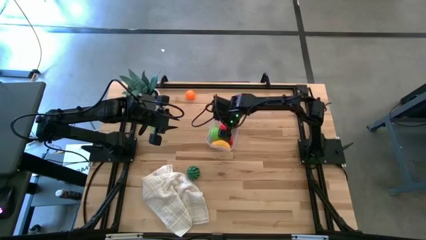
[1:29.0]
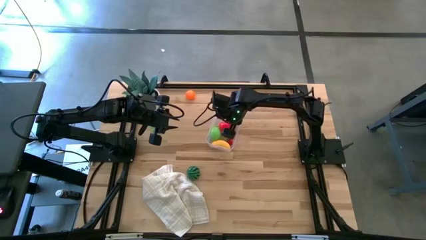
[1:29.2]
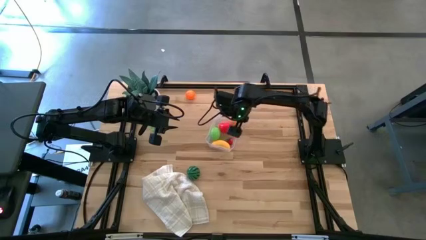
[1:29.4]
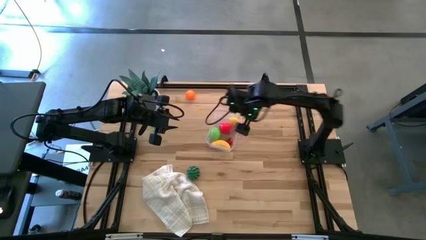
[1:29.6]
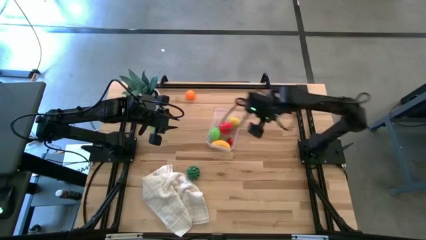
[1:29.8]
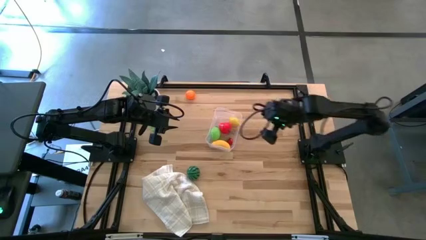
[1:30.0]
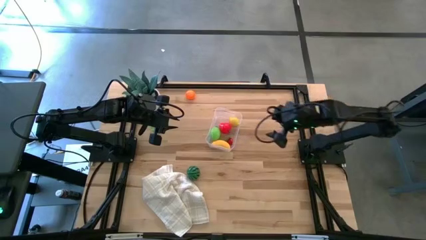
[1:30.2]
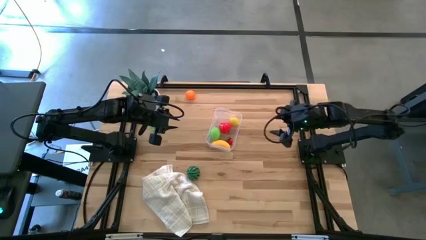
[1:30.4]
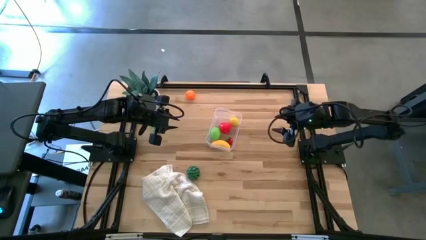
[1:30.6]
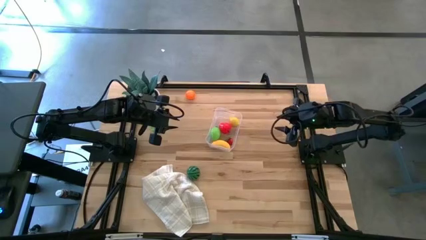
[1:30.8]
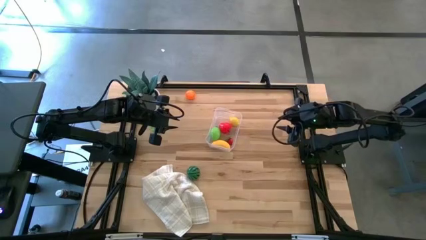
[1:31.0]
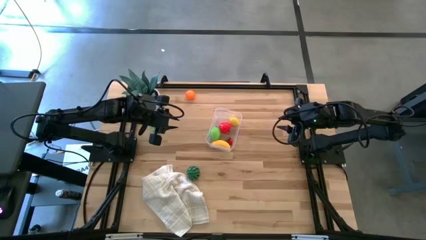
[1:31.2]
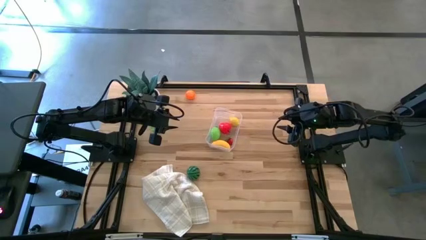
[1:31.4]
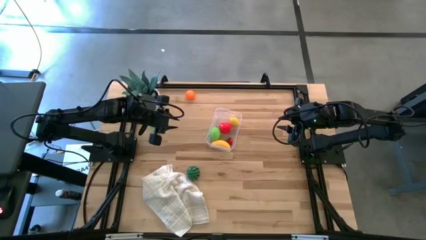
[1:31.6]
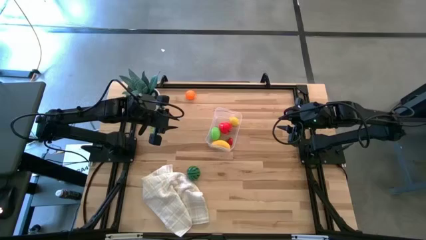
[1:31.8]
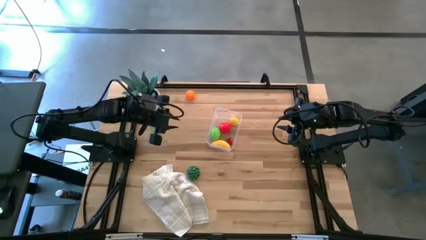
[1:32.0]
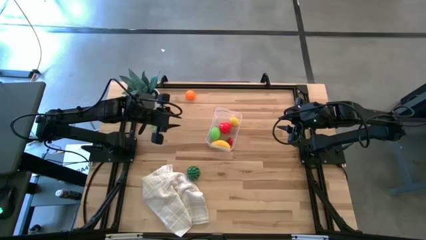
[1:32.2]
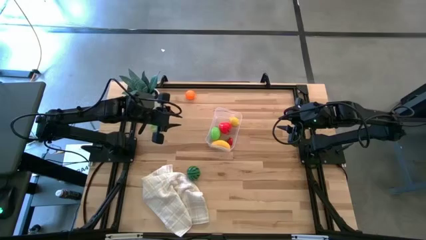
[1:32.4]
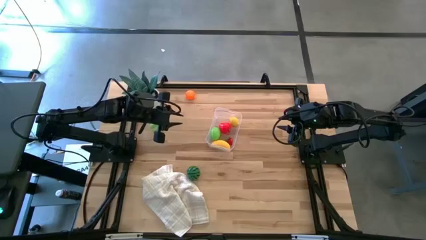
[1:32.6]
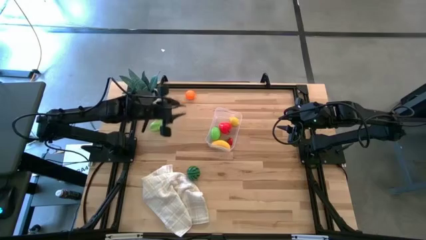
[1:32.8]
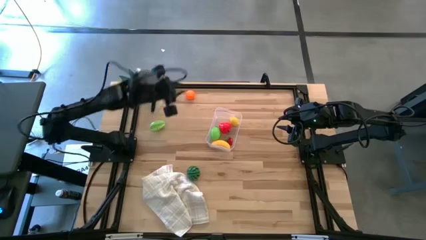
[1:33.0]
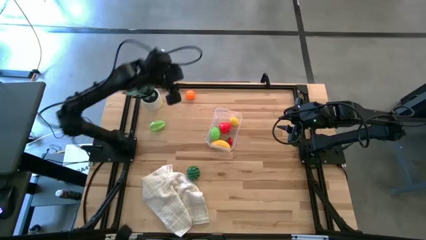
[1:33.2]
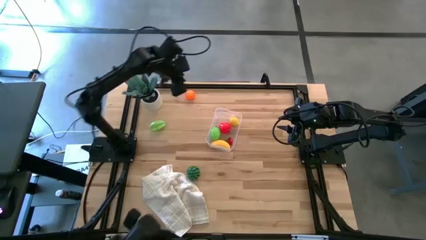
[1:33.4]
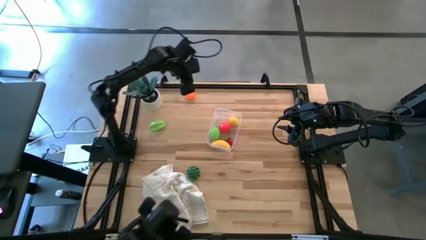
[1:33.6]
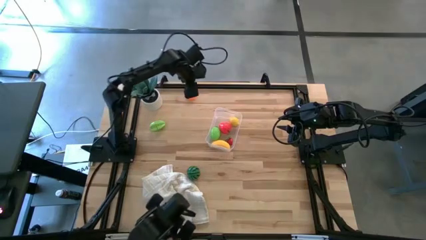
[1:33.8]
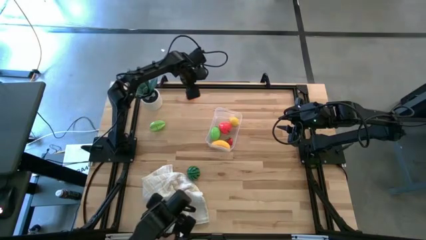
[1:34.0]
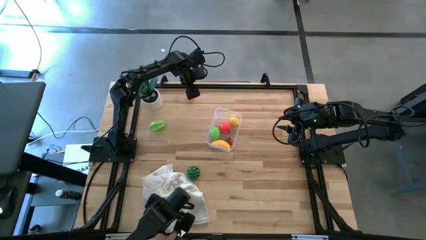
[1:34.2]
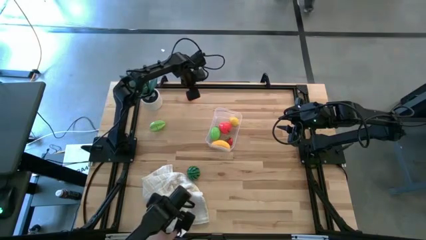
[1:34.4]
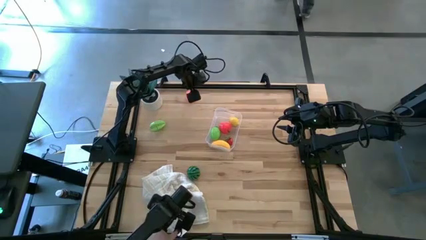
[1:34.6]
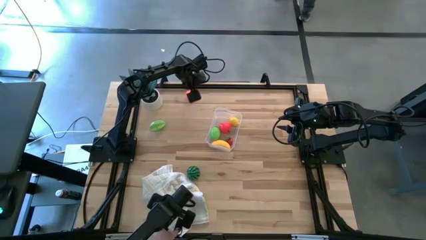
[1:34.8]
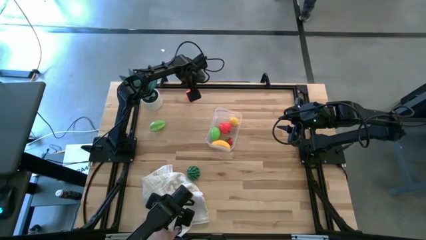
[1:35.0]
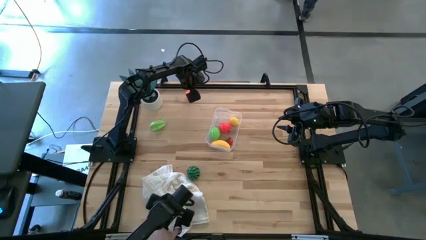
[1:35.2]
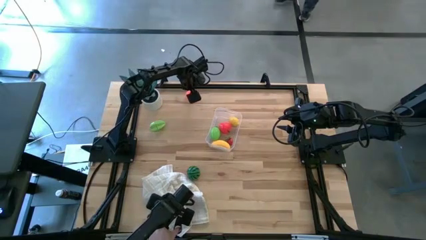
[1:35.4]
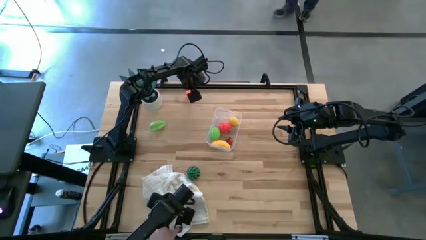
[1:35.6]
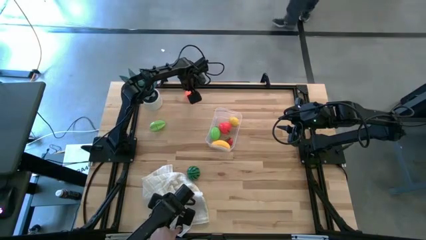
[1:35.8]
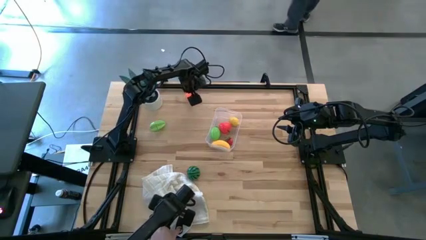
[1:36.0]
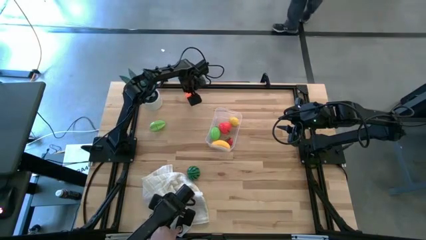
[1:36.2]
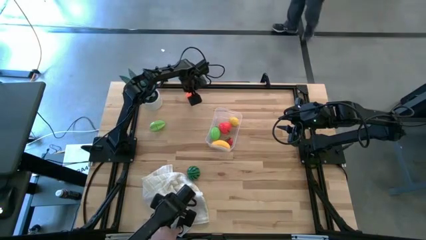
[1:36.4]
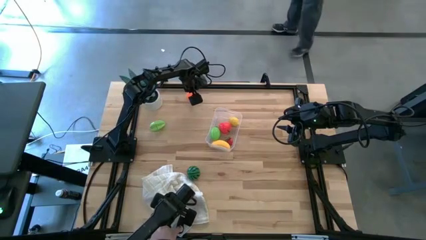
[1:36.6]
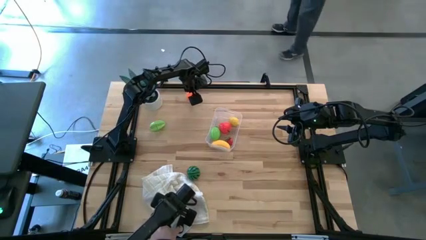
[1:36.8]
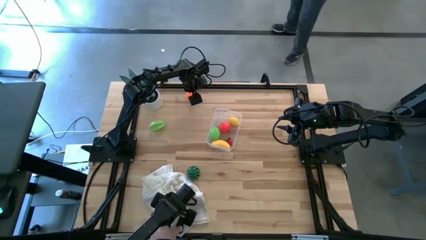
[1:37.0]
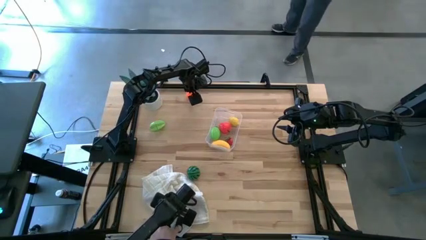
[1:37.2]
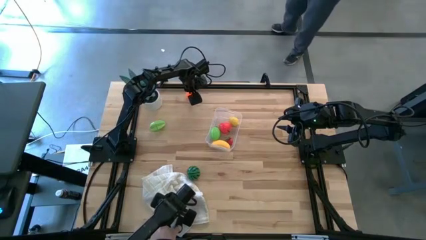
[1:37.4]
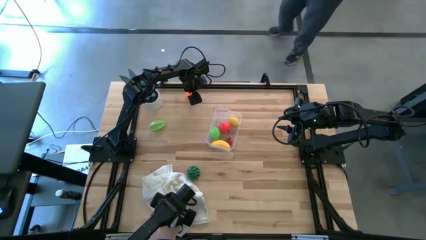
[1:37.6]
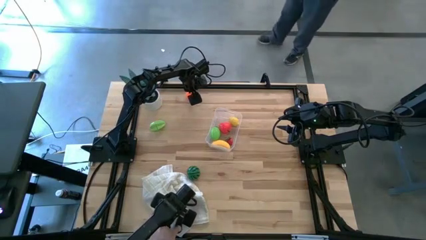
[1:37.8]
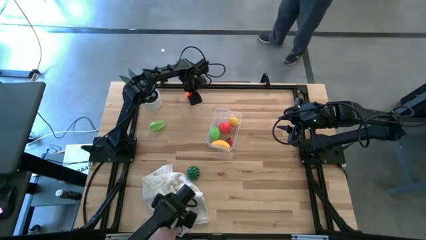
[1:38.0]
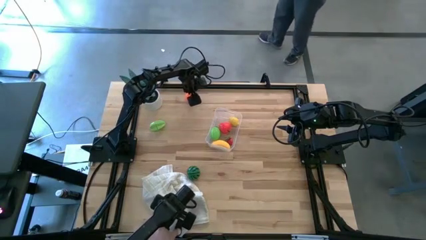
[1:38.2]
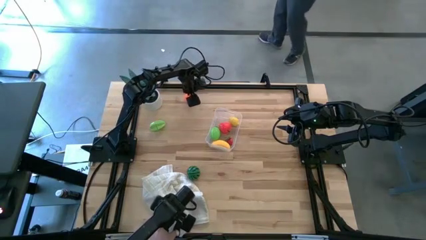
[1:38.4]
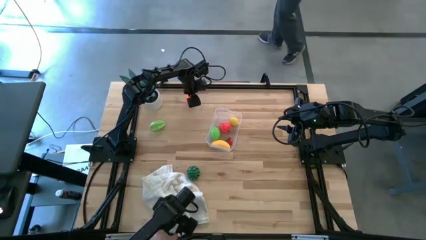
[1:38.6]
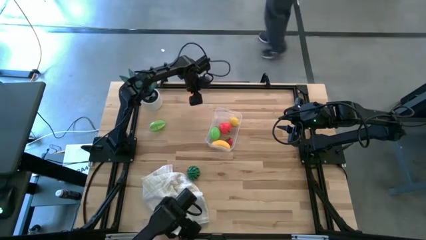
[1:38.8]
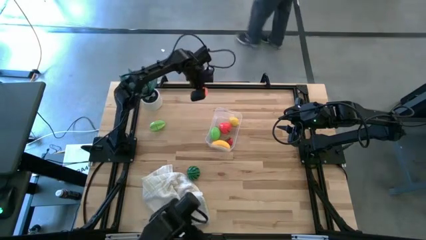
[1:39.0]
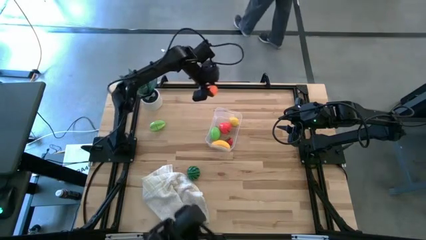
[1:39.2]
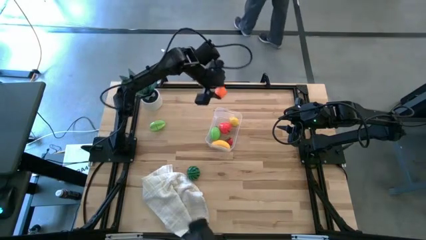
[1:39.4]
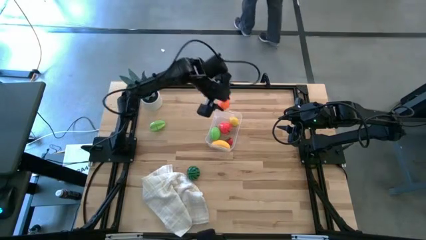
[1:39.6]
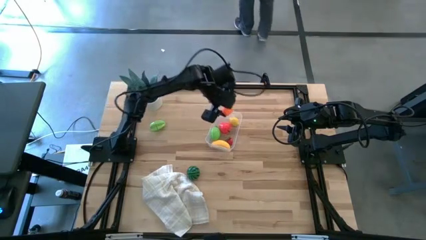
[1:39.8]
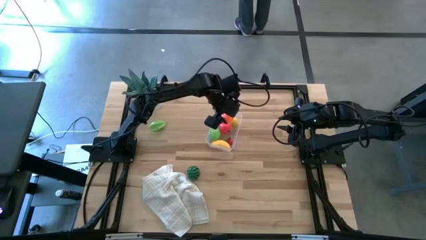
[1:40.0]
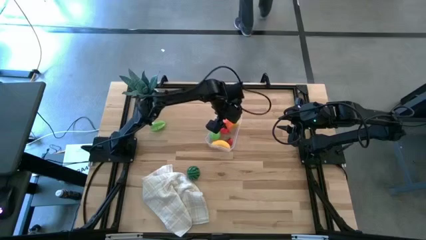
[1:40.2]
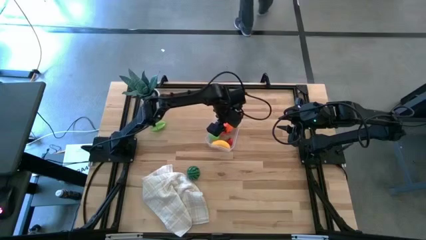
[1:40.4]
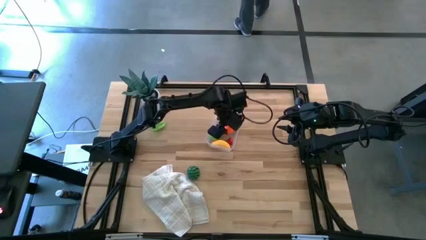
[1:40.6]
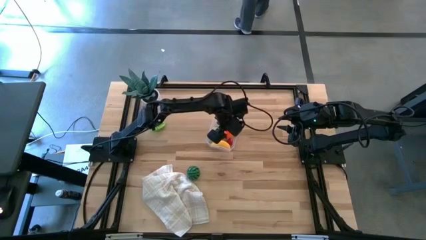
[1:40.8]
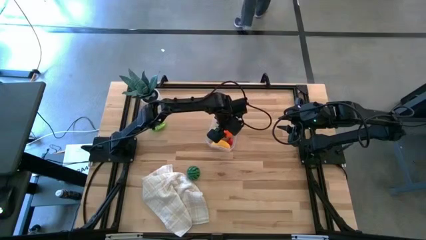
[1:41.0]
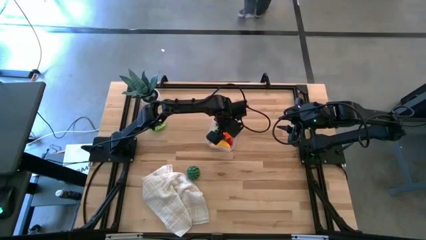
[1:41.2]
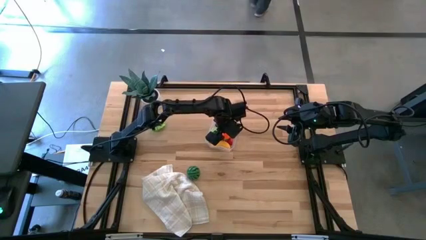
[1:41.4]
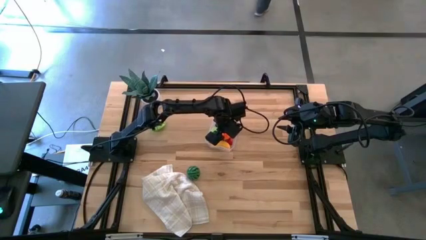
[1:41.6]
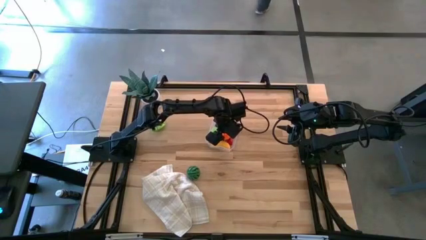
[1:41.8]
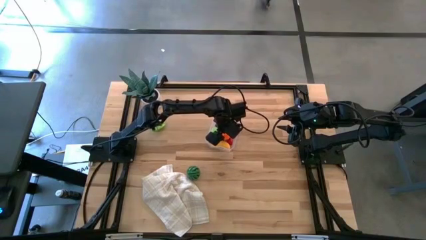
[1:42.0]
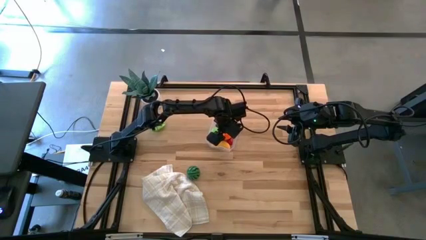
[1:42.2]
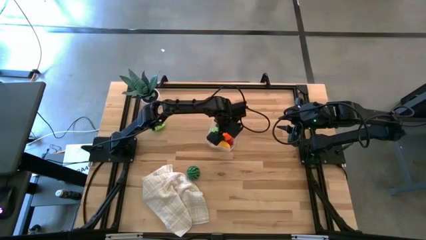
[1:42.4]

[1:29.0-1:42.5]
Task: Pick and placing Produce into tupperware
Put the orange pumpkin into the transparent bin
